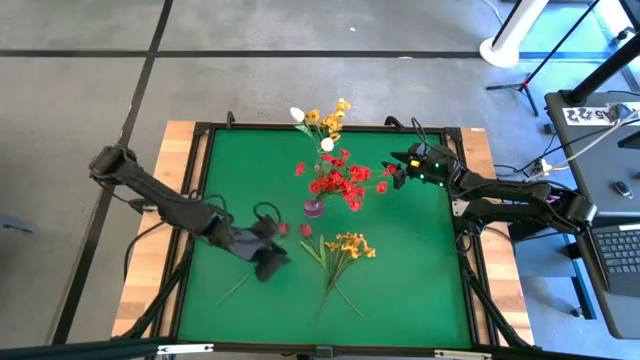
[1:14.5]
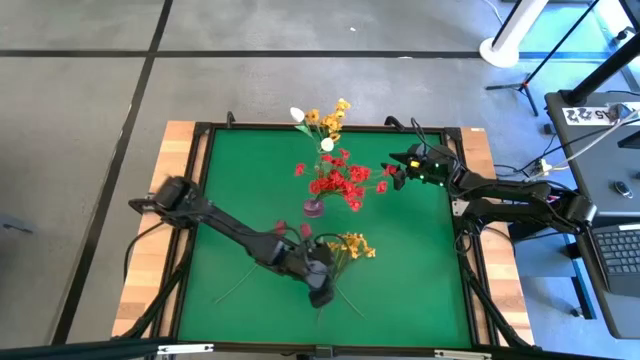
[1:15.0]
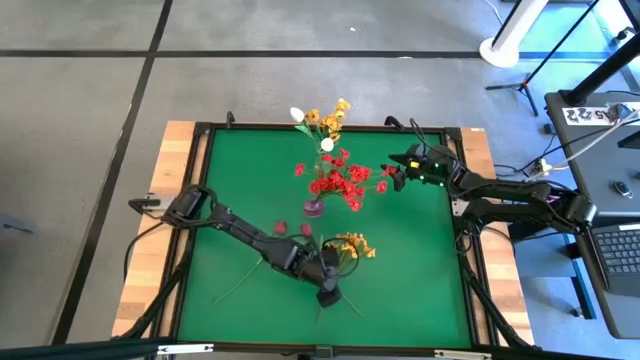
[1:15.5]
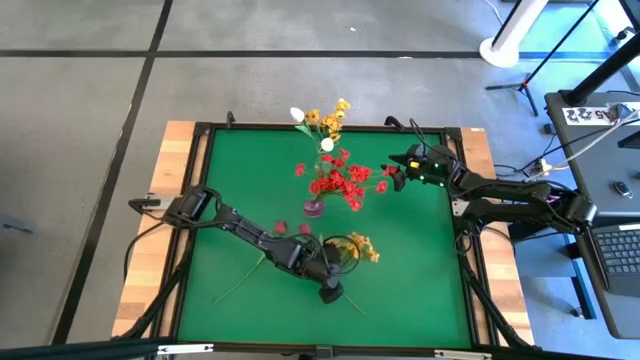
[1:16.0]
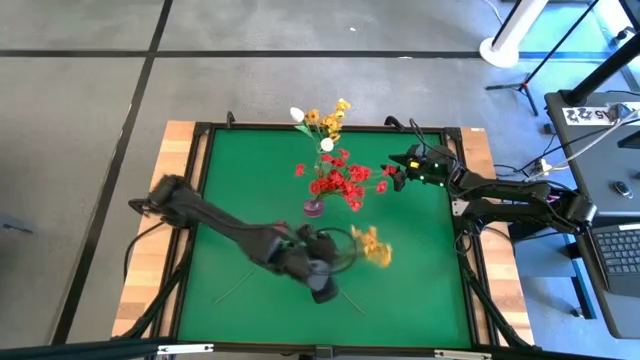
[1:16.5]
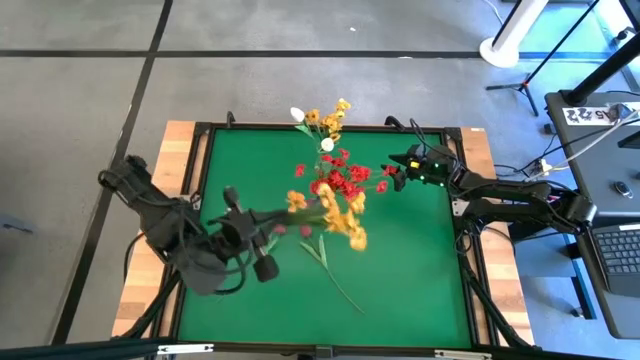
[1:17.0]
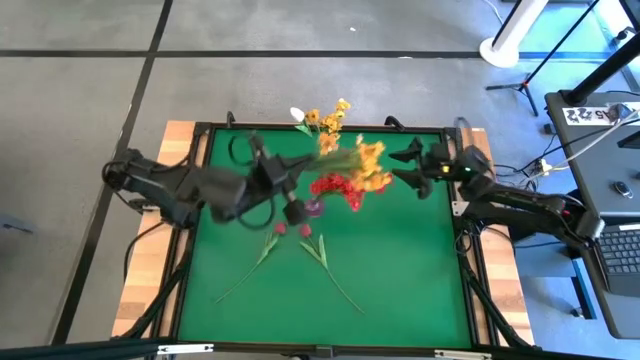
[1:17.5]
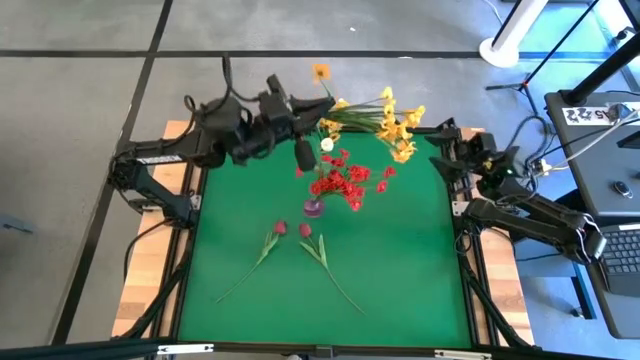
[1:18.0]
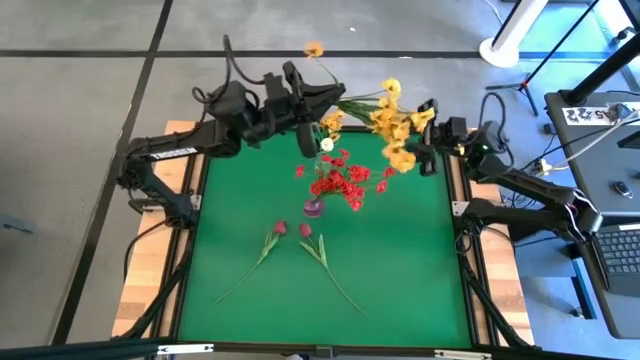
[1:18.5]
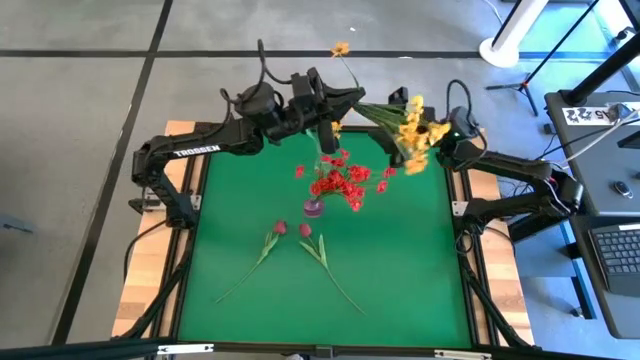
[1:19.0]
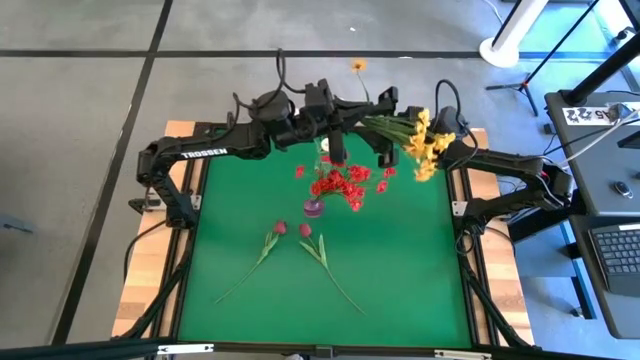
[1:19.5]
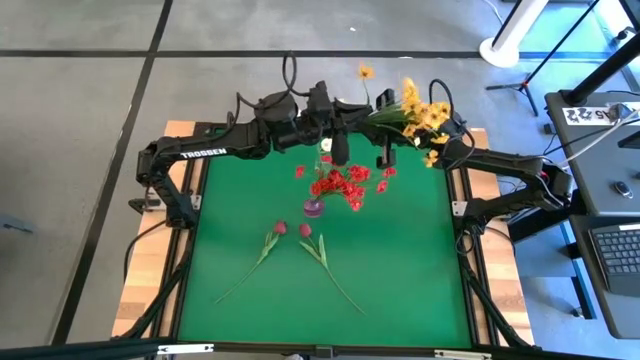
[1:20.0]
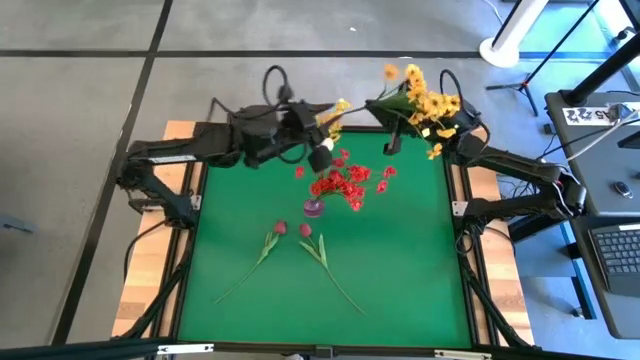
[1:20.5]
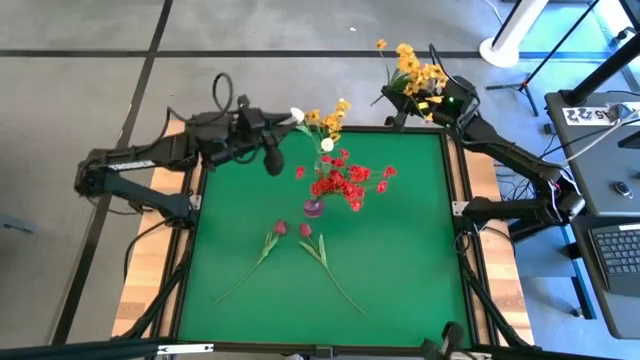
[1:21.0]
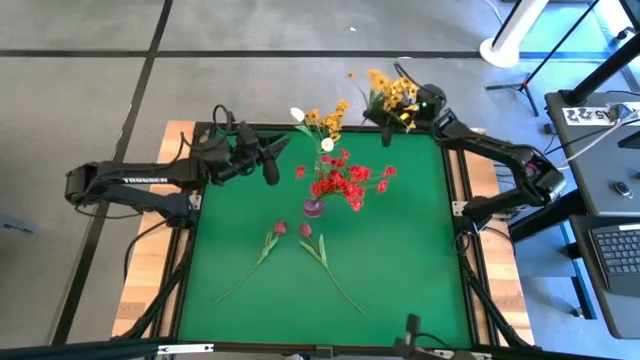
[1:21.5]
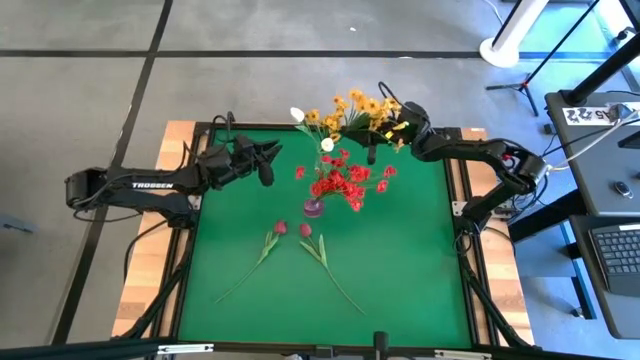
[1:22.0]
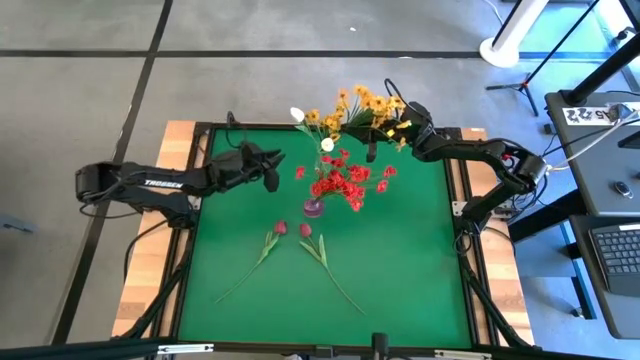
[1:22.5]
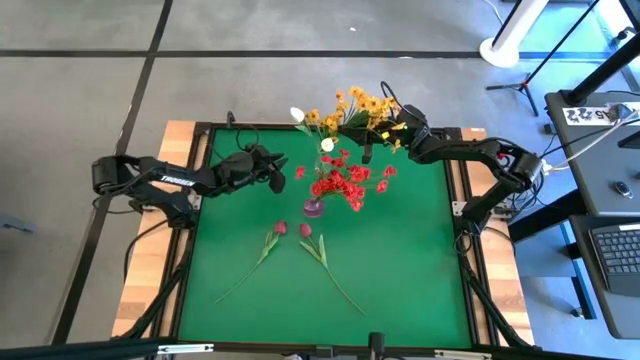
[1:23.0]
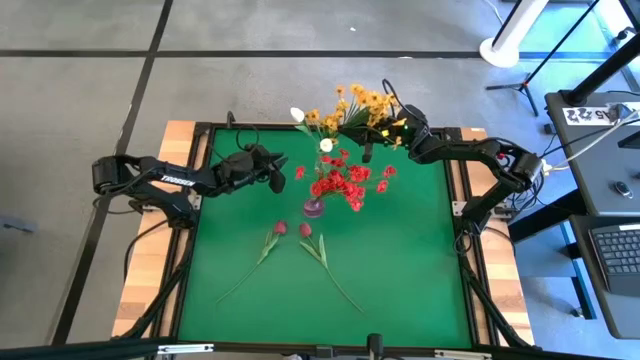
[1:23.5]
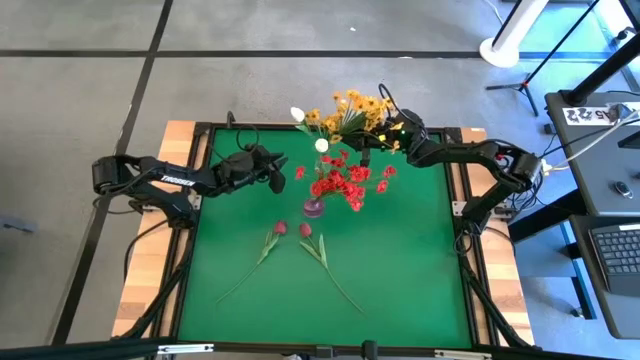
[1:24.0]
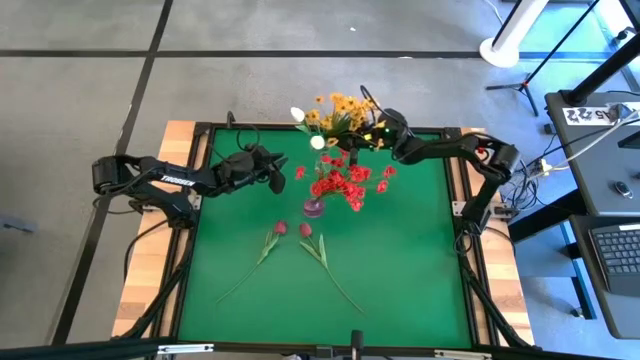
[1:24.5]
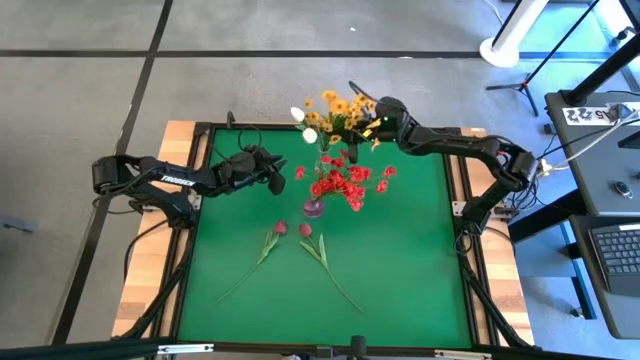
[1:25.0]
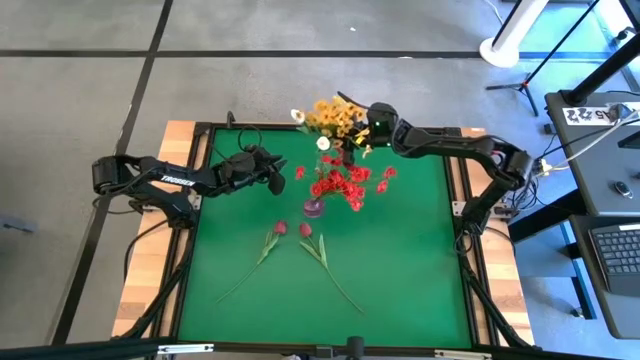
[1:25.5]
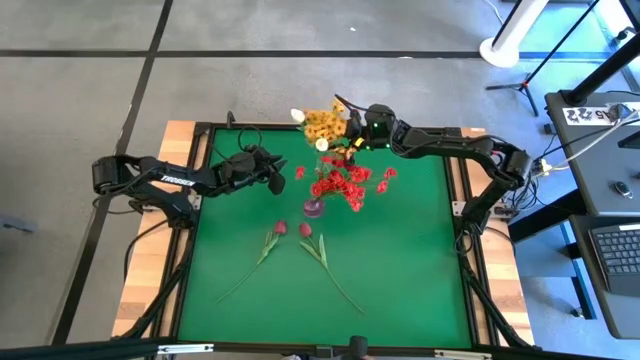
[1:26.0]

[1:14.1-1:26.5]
Task: Sort flowers into vase by color
Put the yellow flowers into the transparent vase

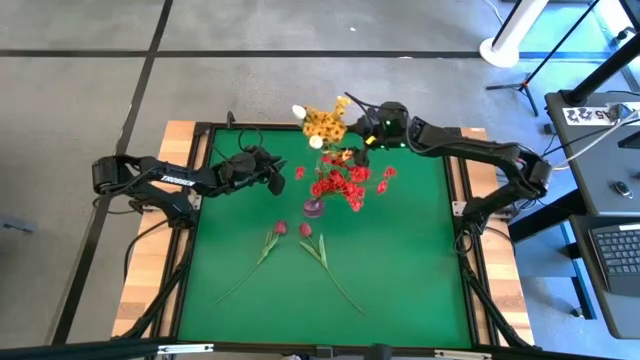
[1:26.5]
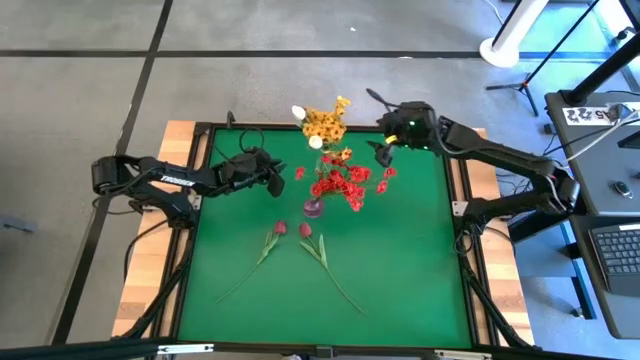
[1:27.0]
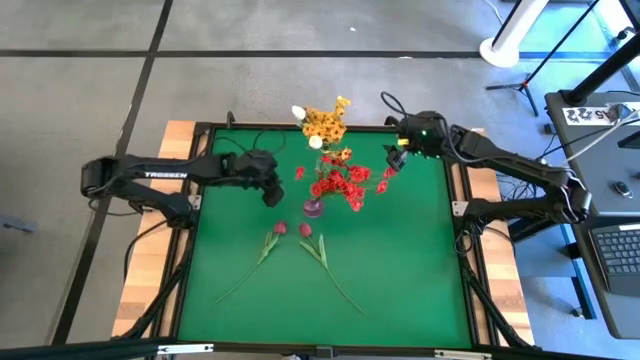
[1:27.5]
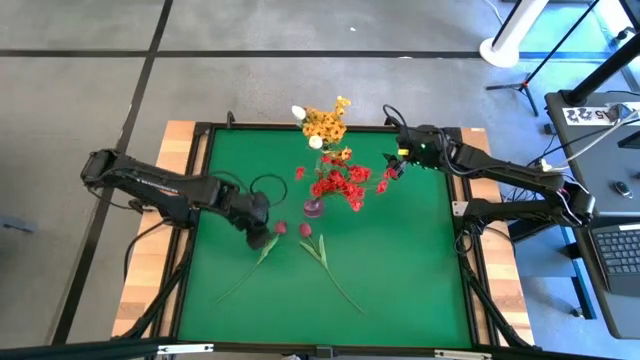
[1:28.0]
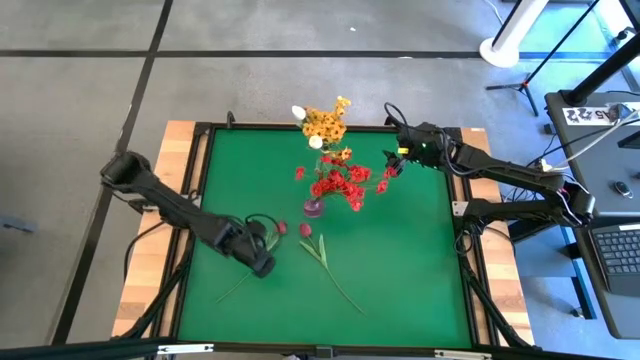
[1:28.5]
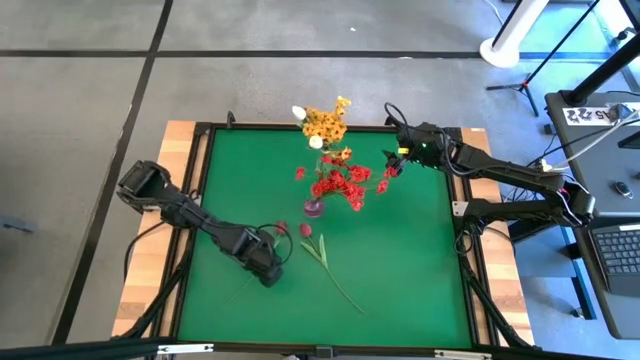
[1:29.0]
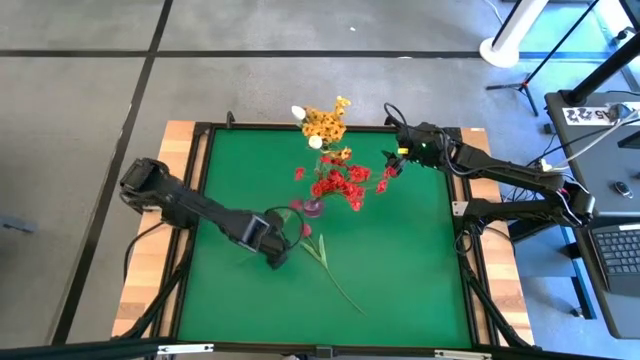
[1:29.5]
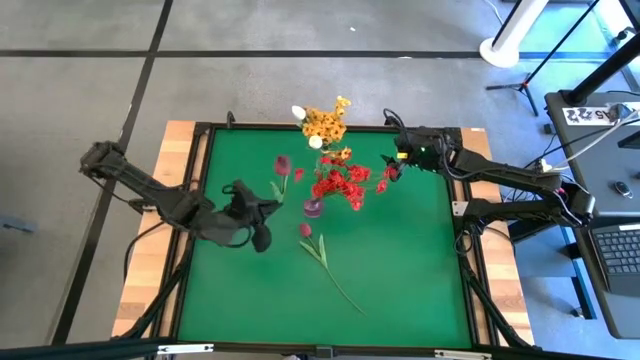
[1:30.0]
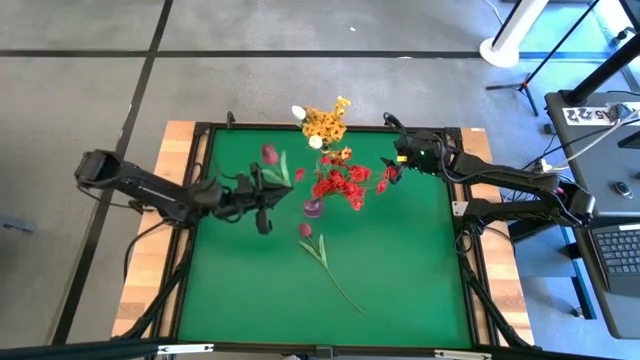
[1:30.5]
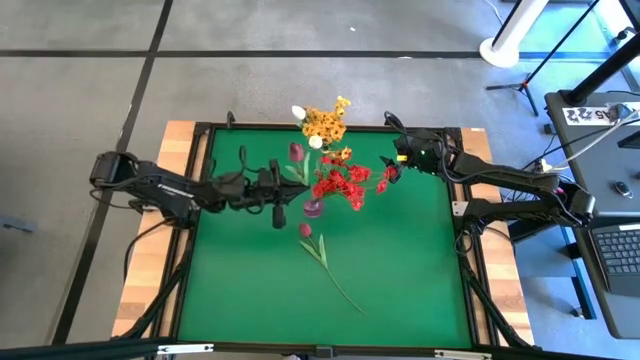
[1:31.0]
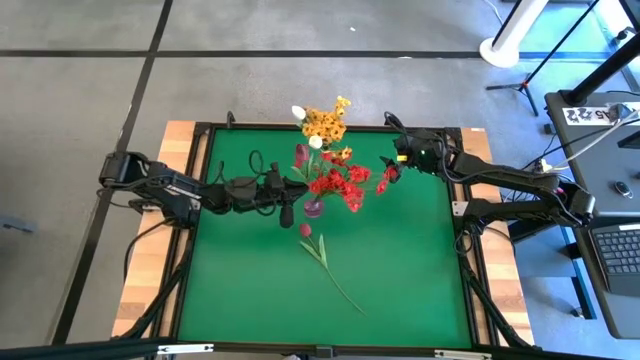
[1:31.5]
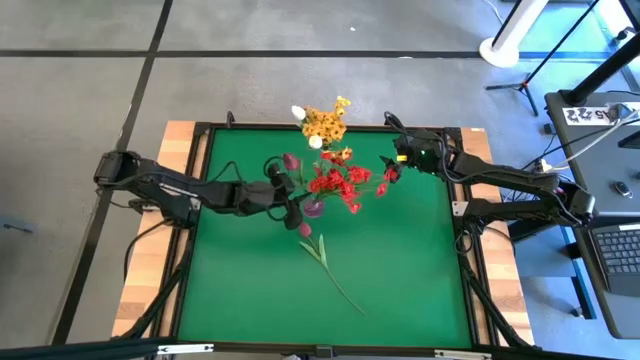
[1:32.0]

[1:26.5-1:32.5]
Put the left red tulip into the violet vase

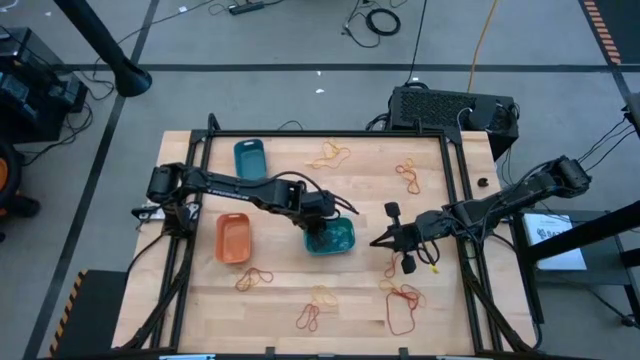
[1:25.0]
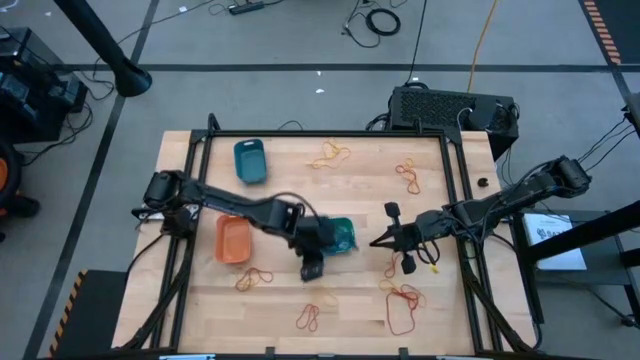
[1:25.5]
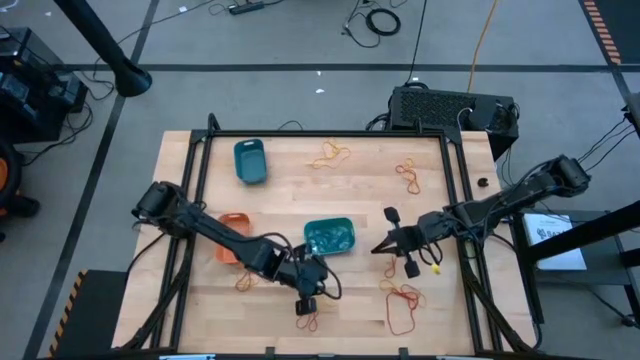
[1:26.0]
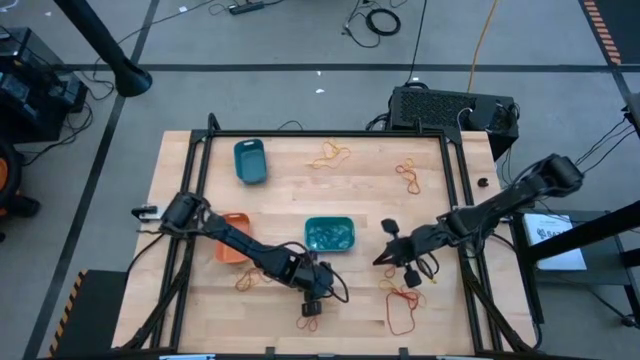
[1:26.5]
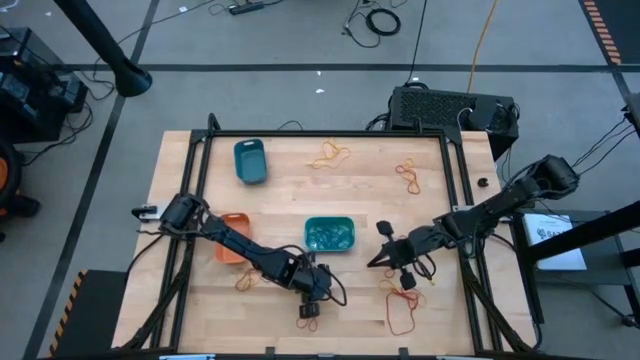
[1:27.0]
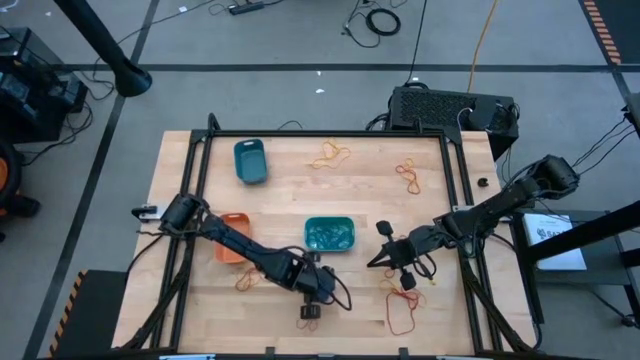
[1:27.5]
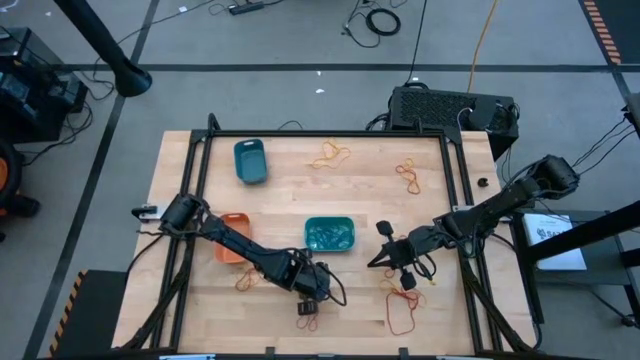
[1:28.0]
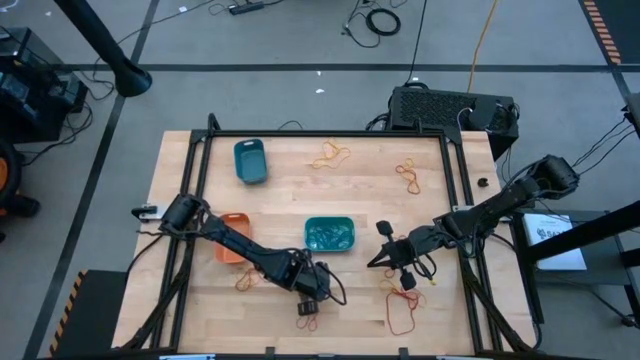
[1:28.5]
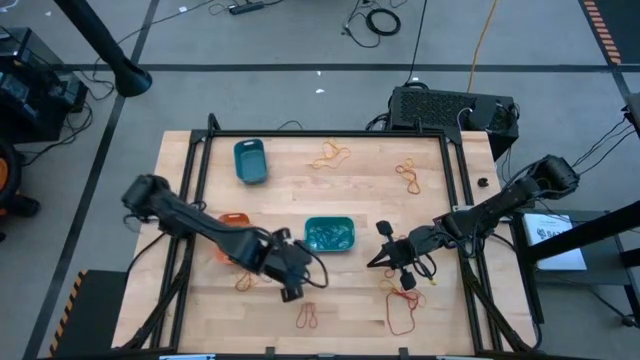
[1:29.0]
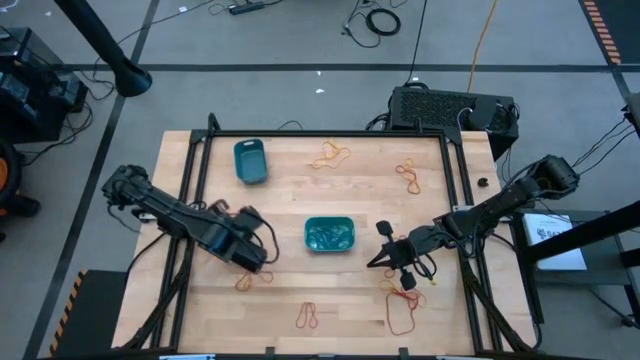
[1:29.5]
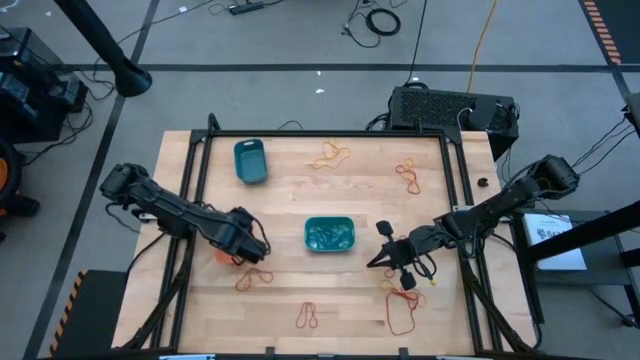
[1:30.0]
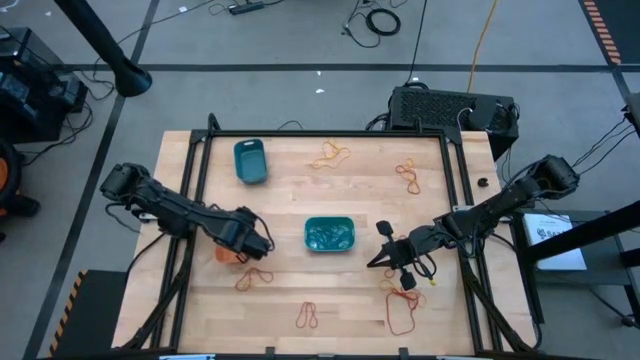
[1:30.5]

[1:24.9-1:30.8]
Task: Sort rubber bands into baskets
Put the yellow rubber band into the orange bin
